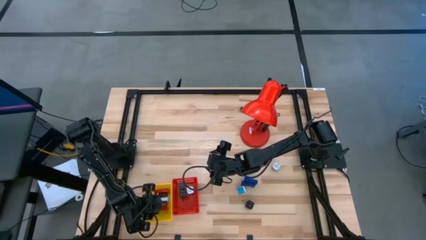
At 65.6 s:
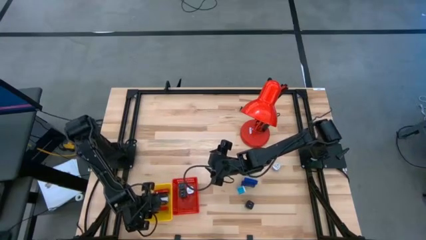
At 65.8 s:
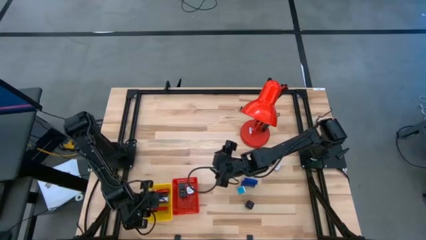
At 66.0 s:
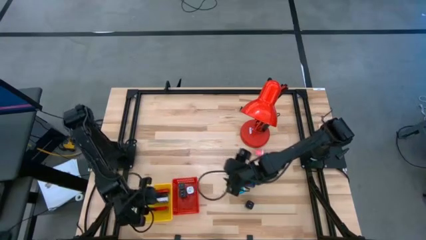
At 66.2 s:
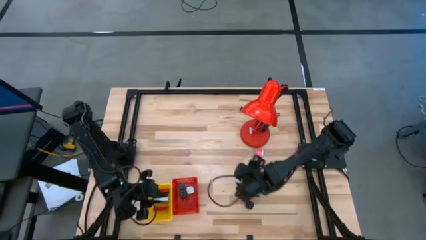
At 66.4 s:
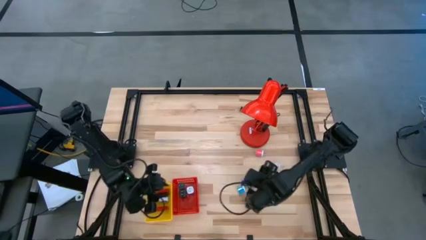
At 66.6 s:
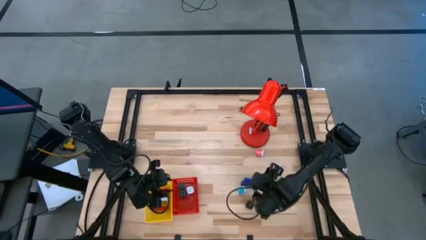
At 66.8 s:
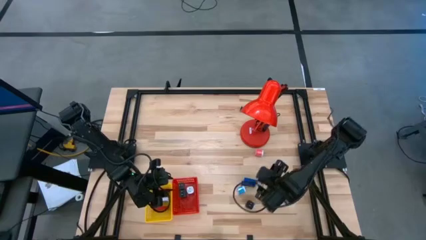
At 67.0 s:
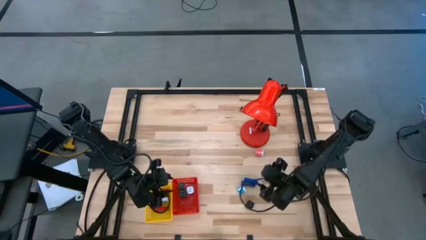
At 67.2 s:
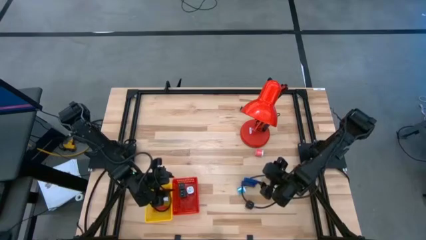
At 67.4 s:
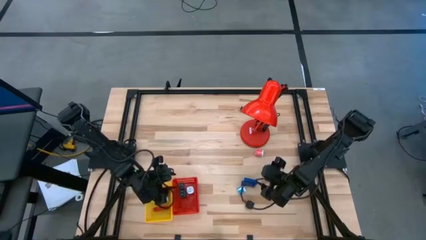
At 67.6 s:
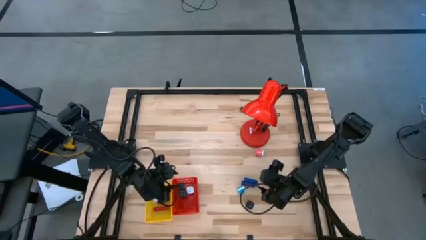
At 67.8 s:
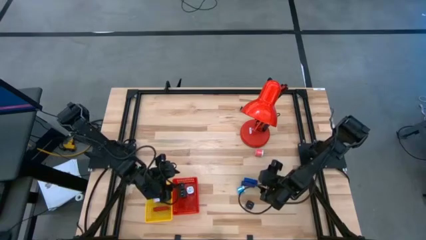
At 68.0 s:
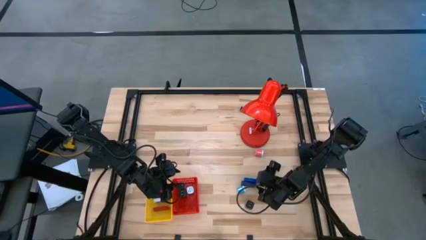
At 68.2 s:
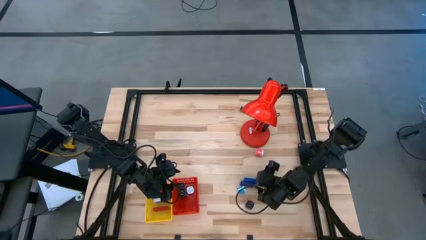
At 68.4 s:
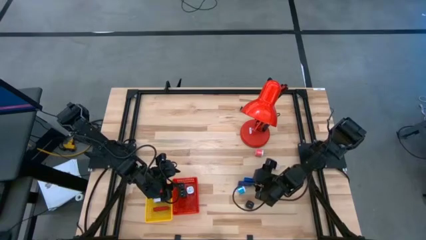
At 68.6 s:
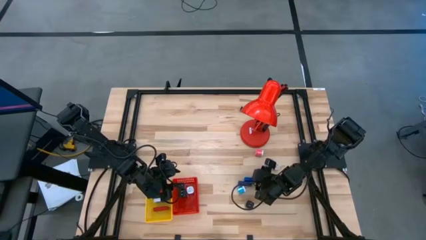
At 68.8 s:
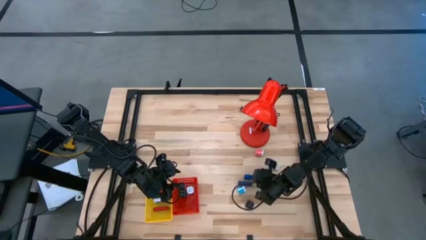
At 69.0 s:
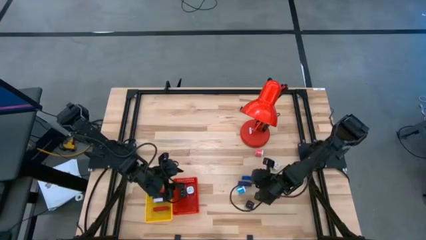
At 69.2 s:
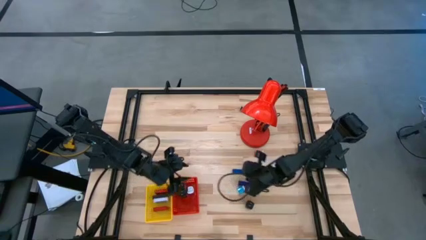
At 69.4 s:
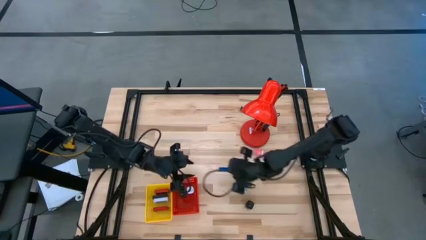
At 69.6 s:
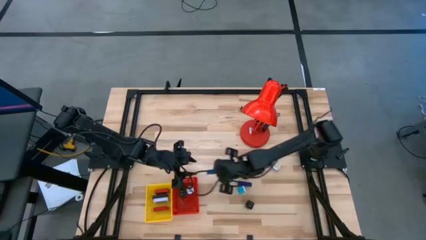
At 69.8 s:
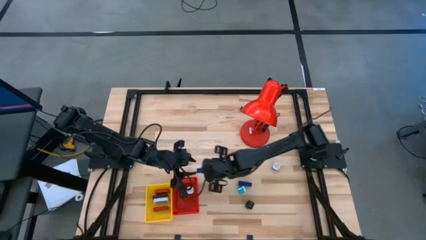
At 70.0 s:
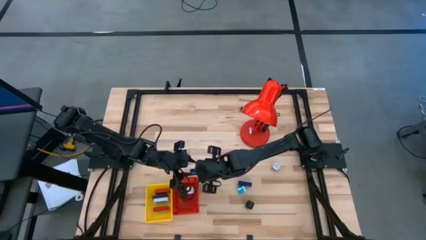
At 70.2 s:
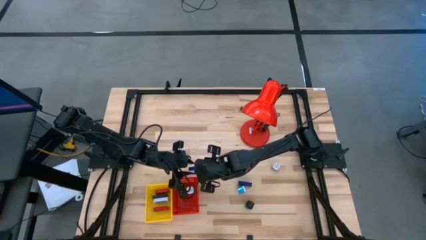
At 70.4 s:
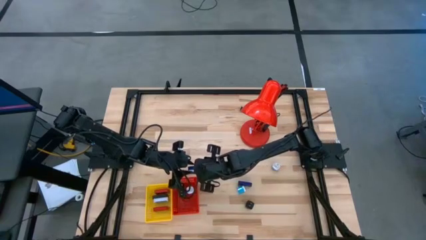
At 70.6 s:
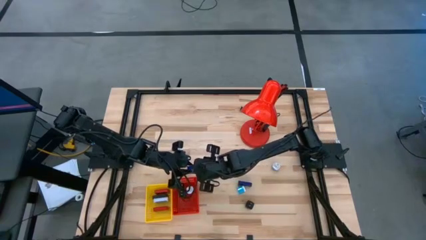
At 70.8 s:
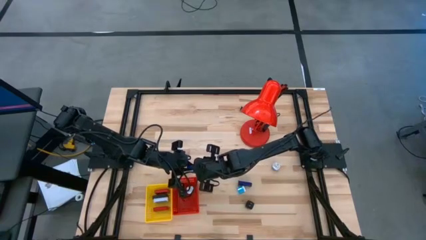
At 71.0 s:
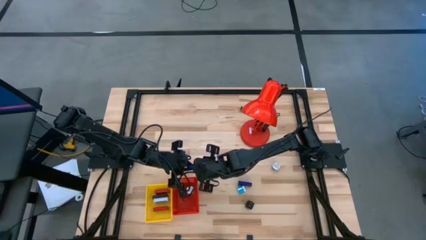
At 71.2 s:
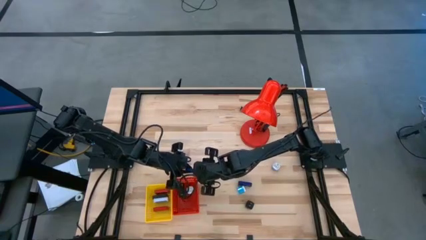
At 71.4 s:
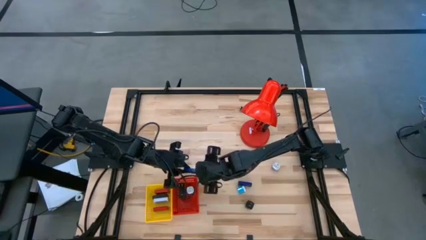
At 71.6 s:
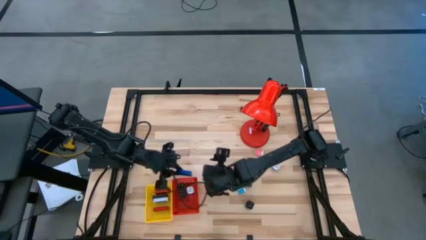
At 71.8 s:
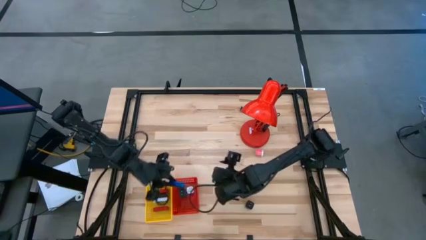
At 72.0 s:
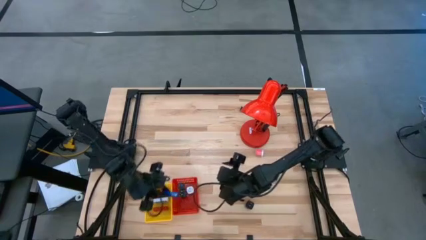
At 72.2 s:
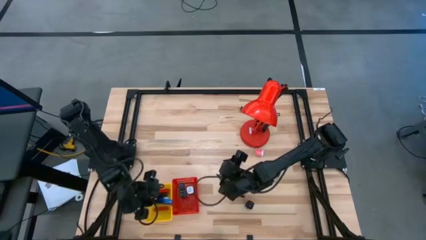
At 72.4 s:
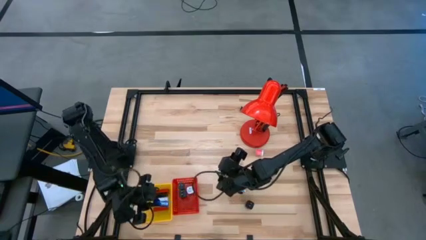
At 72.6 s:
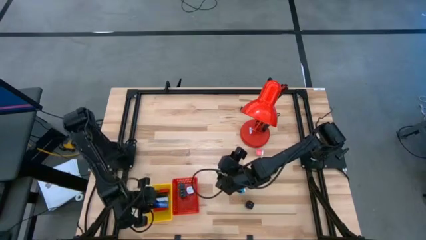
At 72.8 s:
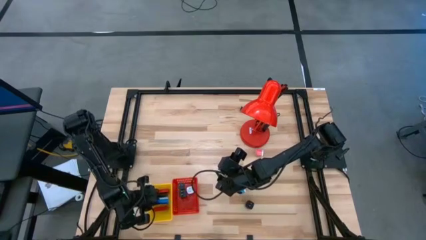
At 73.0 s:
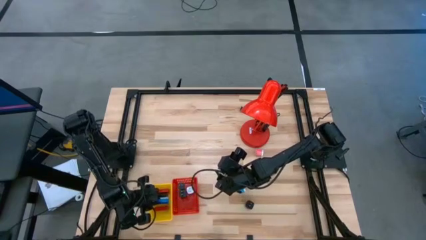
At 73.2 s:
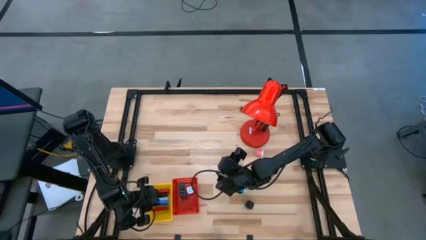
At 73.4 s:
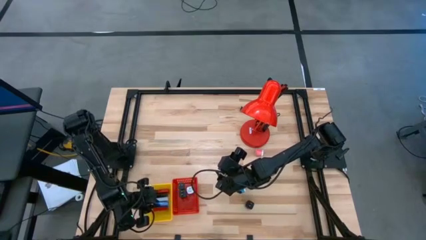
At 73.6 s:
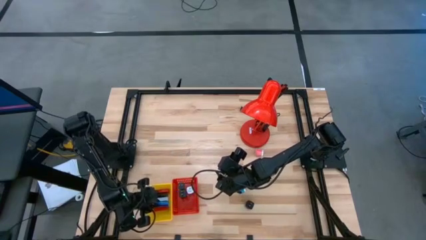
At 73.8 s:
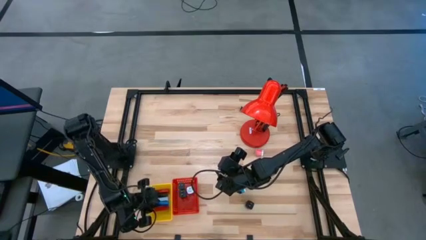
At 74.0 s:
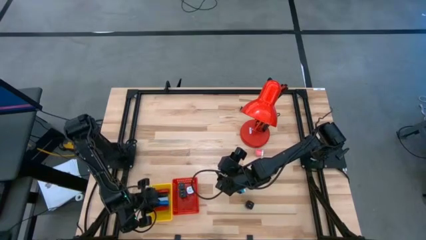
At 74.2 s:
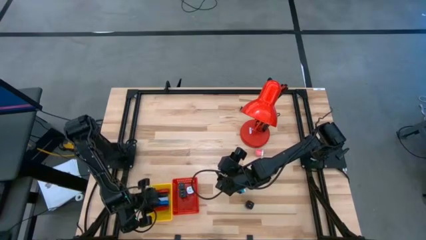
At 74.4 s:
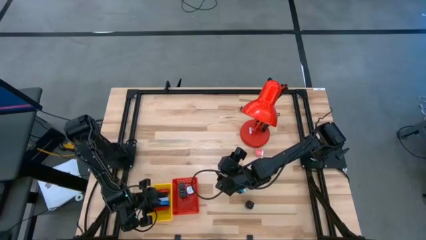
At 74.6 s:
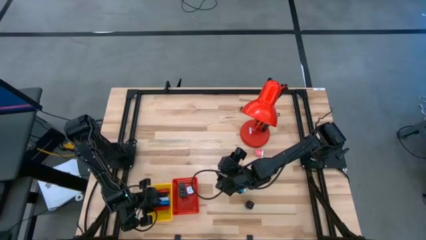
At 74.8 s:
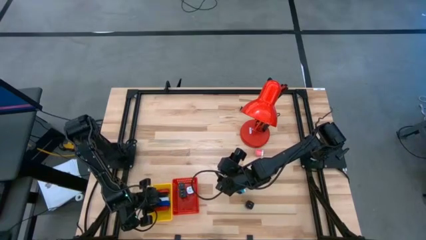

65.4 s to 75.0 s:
Task: Pick & Place Office items
Put the bottom blue digital clock into the yellow bin

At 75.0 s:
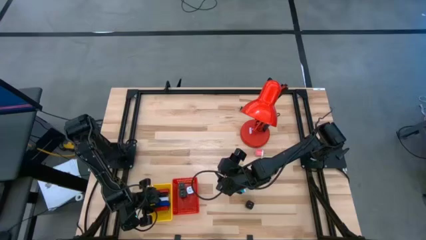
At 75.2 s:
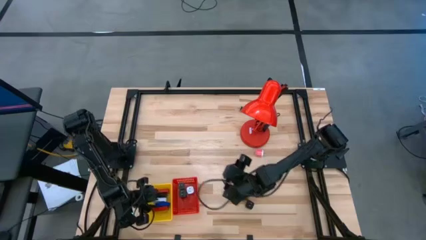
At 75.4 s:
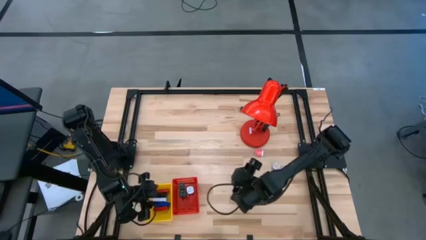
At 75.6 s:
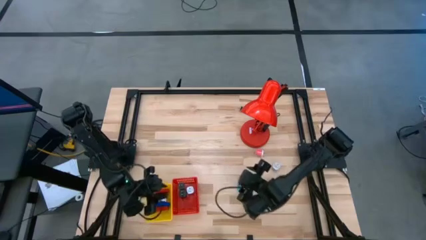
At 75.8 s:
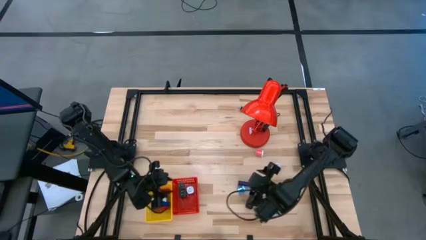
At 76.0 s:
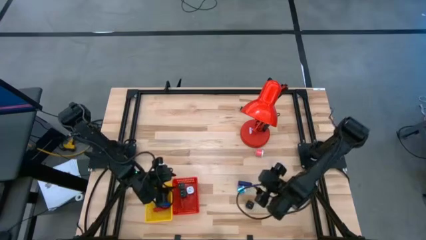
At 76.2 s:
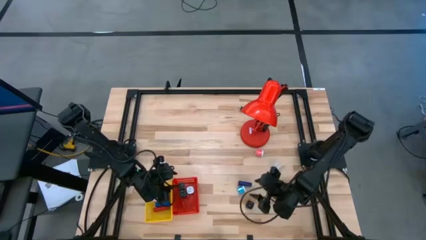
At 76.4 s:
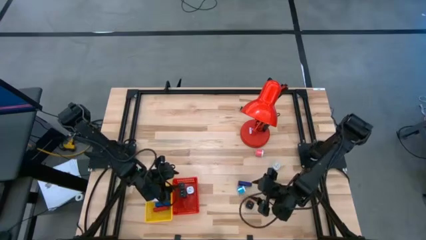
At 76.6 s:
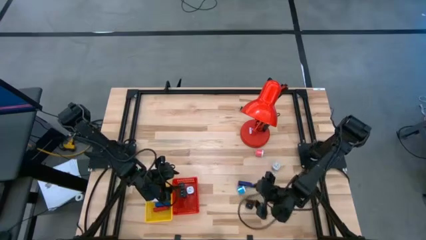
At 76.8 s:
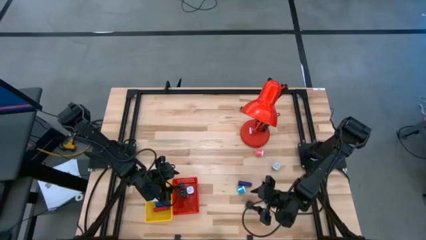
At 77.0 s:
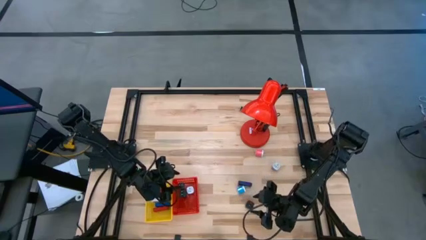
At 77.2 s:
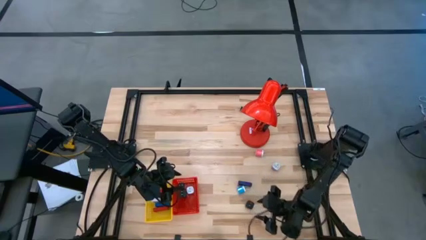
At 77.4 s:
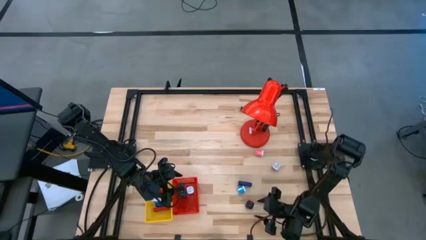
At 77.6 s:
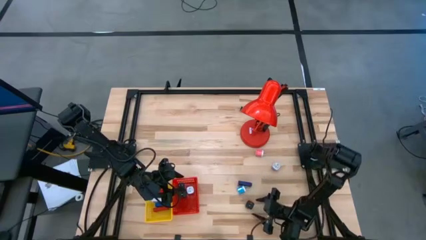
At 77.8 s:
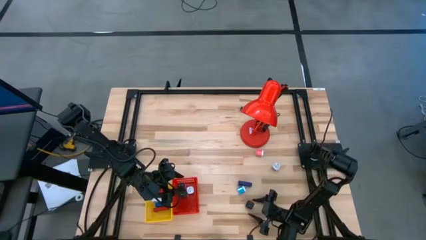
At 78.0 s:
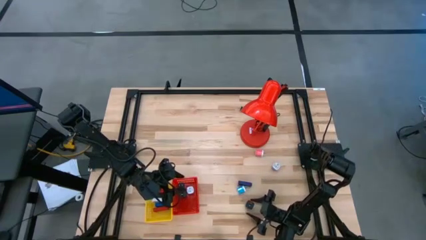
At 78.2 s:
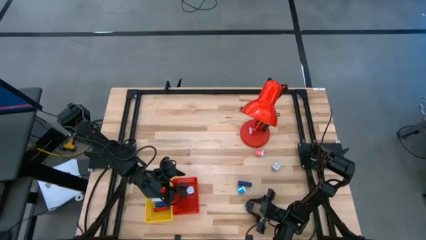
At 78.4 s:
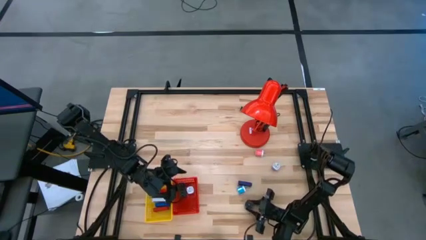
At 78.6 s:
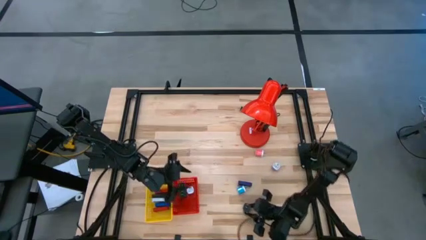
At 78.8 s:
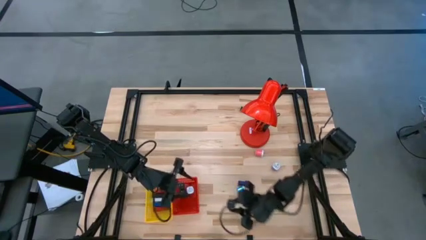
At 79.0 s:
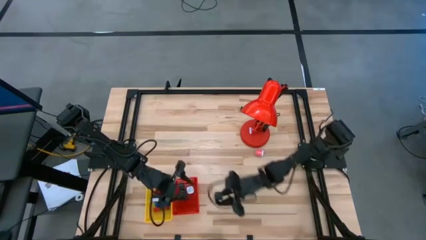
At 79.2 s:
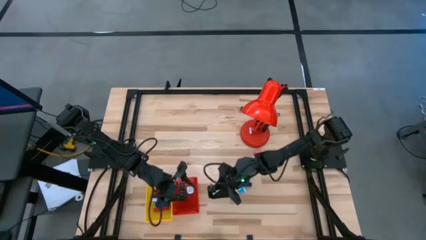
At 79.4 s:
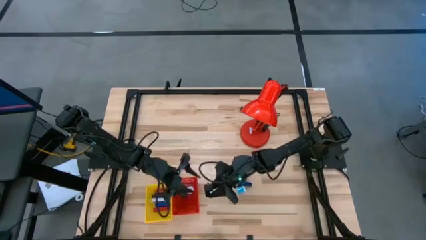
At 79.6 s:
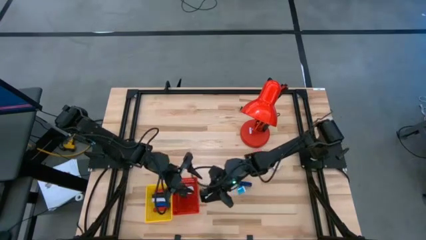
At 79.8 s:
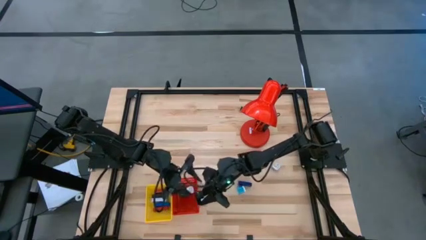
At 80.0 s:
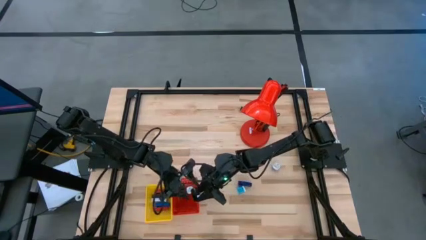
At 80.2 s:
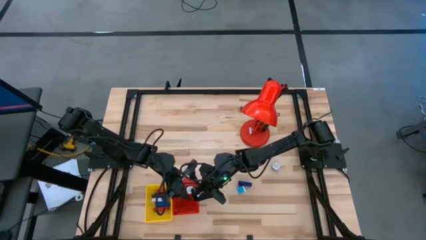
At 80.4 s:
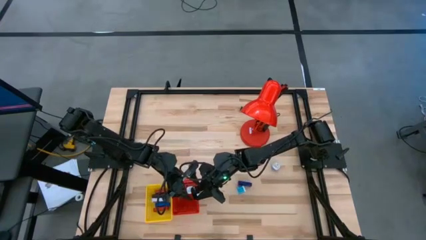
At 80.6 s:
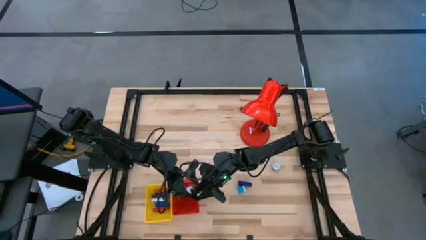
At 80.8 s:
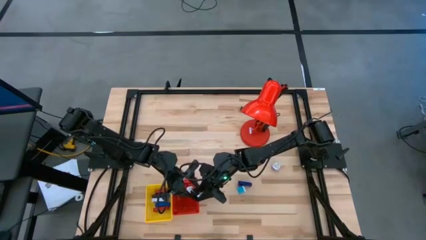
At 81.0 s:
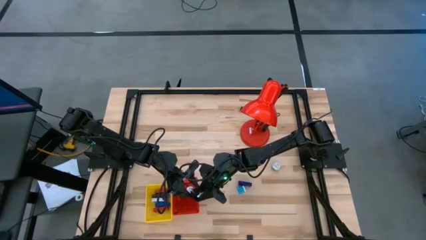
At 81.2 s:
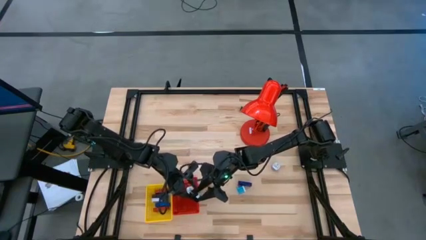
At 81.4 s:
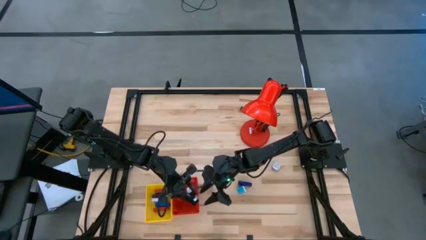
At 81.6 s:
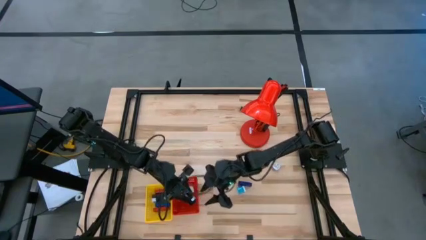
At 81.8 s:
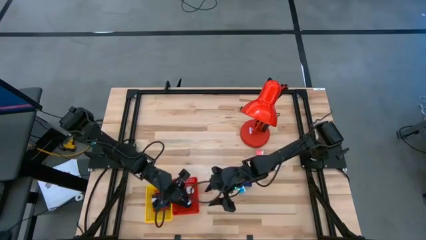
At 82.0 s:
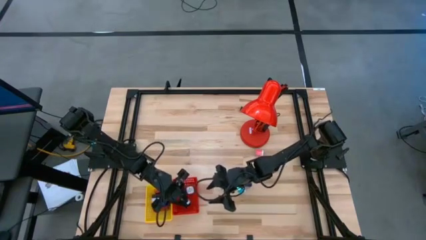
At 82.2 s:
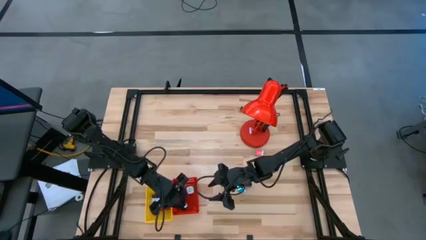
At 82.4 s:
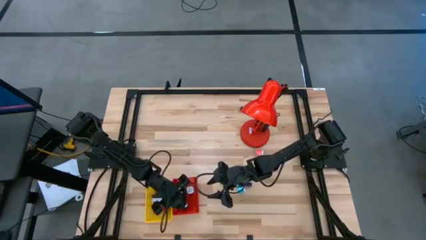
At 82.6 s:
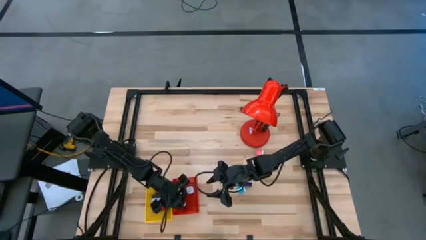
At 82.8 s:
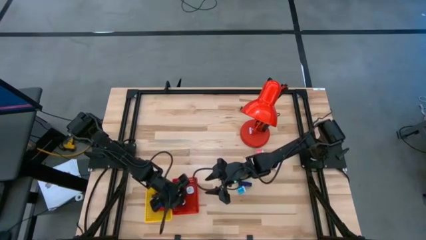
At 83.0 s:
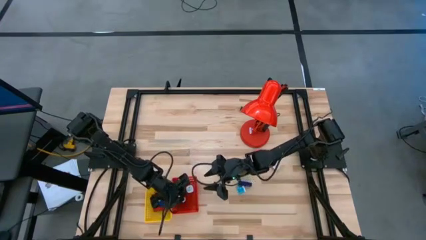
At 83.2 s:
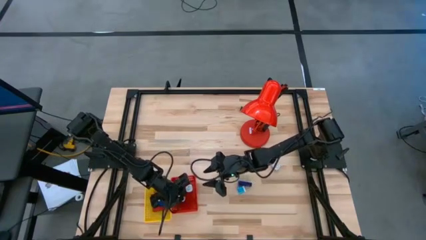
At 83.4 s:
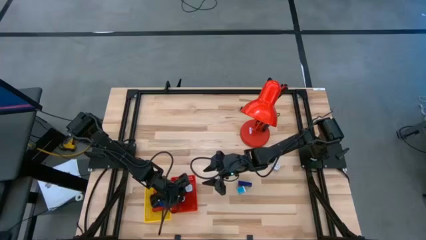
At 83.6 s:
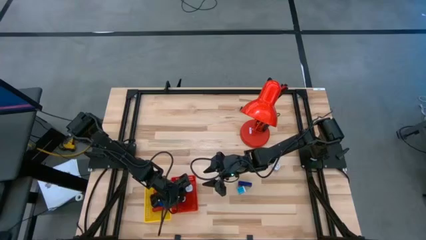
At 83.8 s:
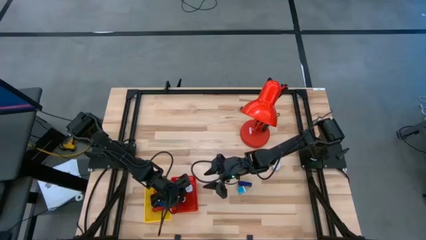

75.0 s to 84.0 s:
Put the black charger adapter into the red bin
